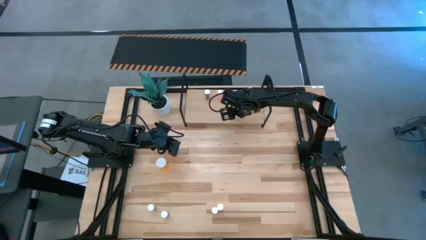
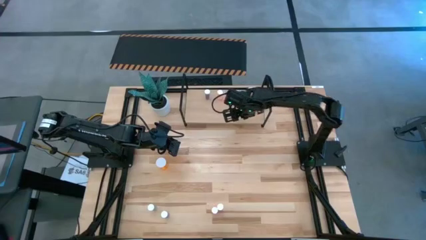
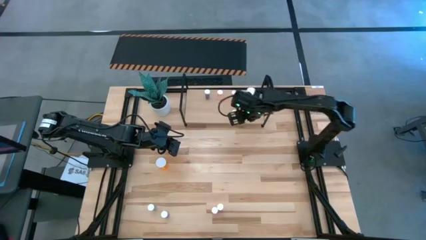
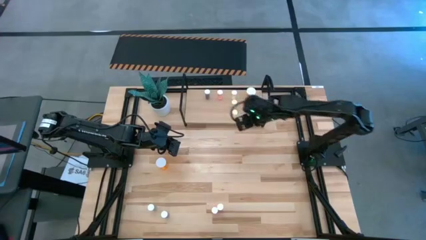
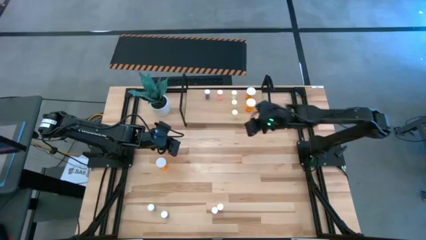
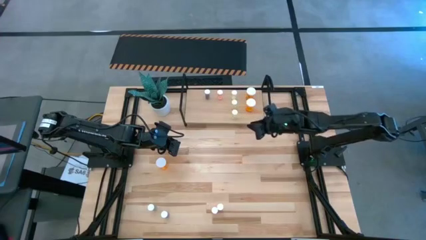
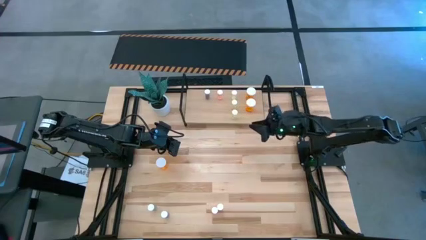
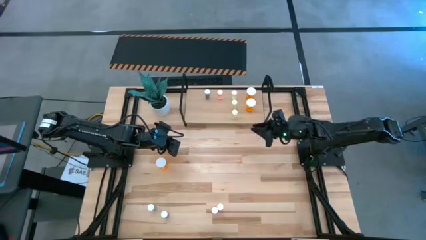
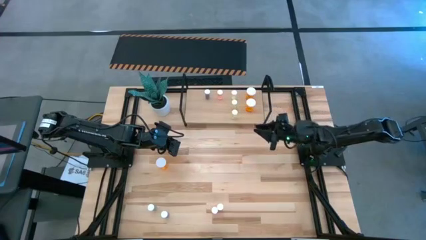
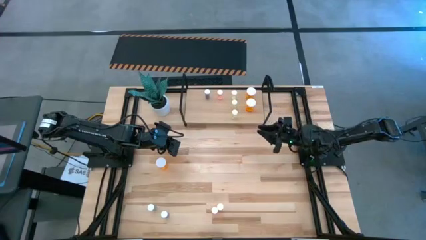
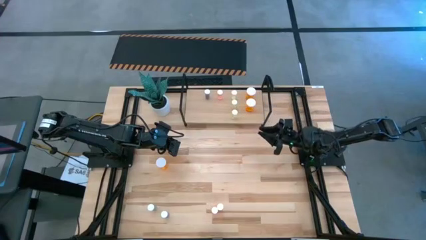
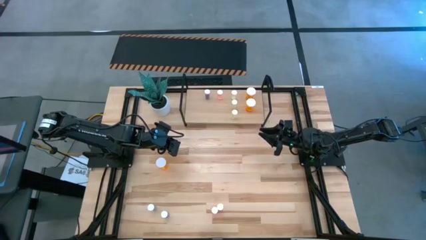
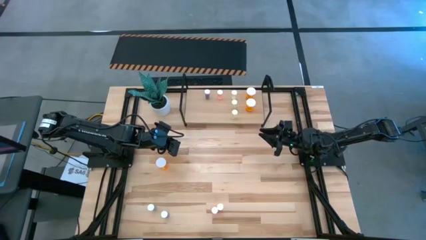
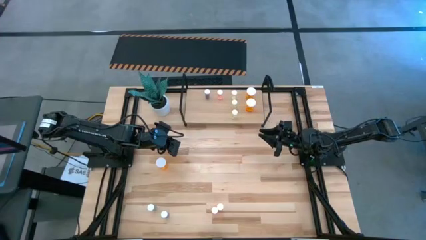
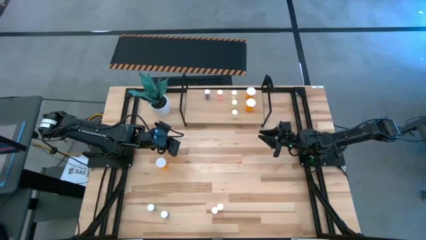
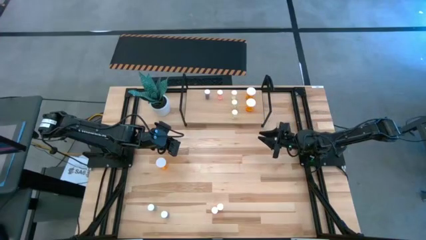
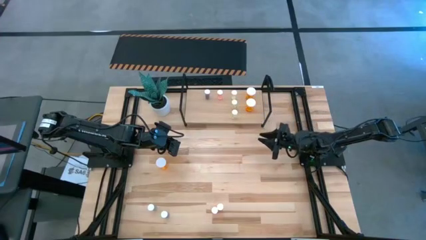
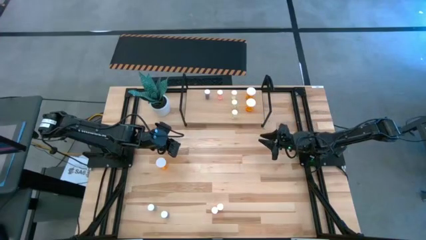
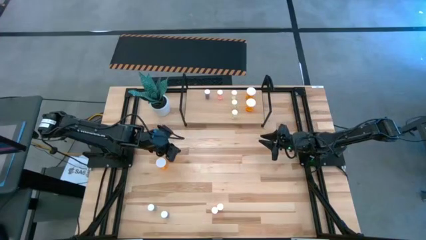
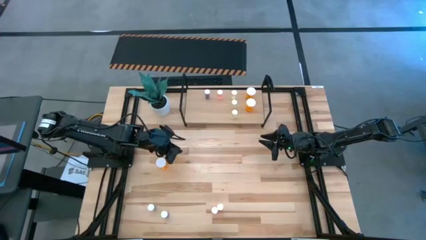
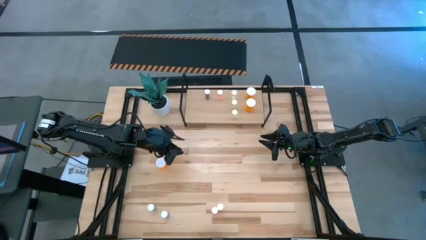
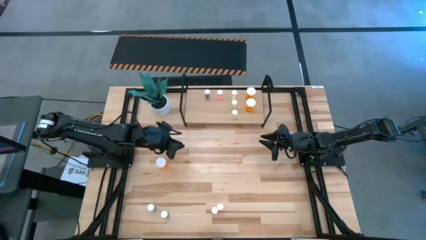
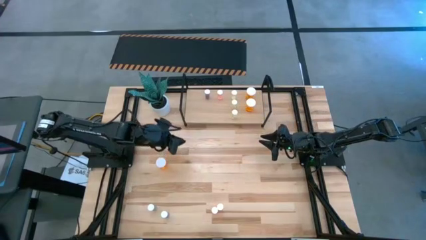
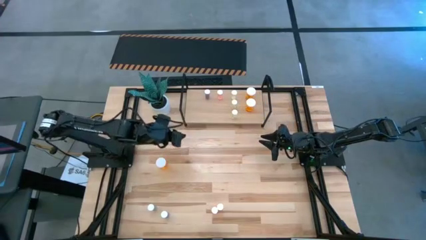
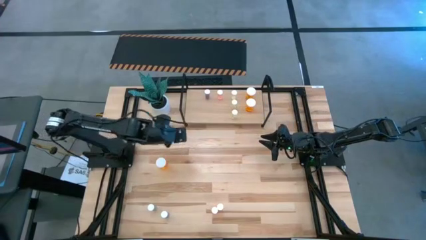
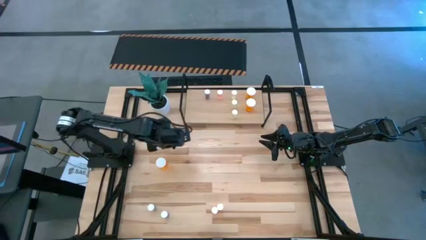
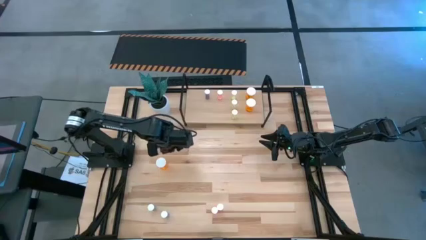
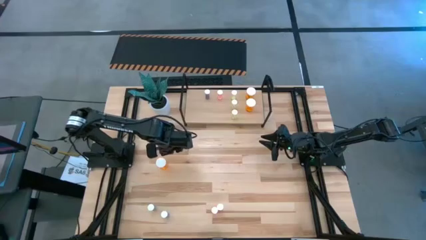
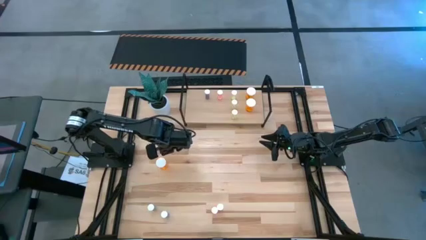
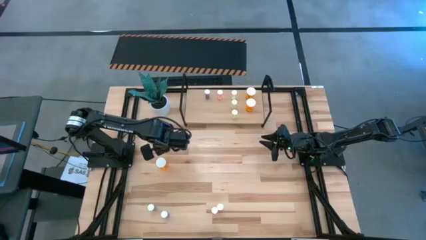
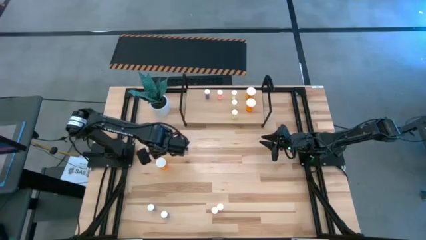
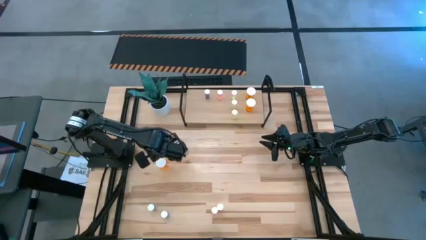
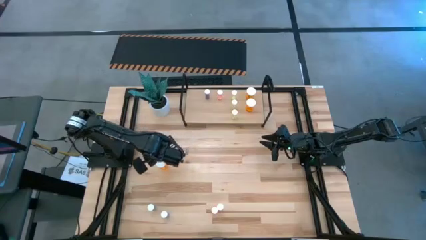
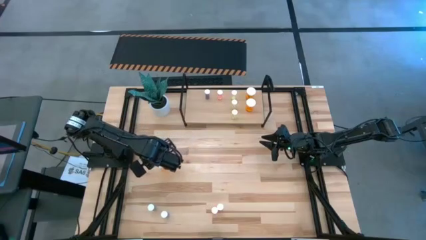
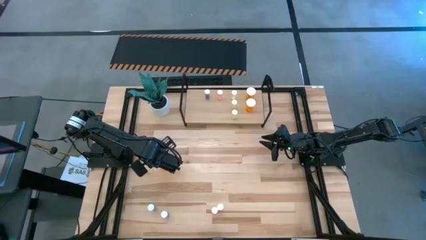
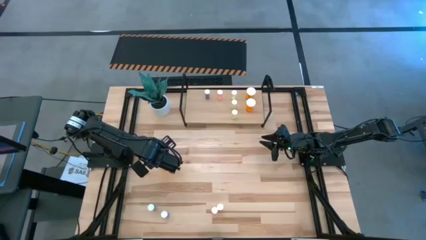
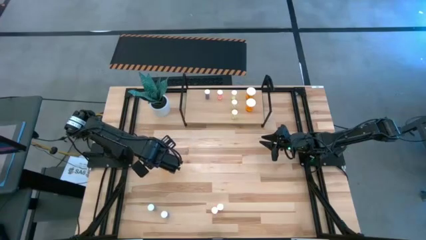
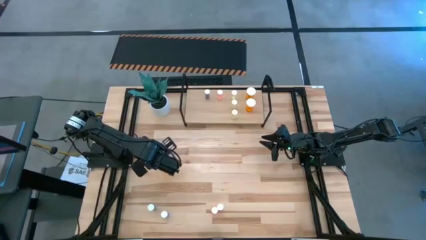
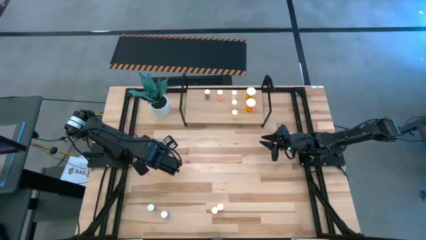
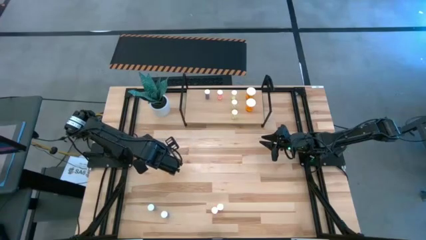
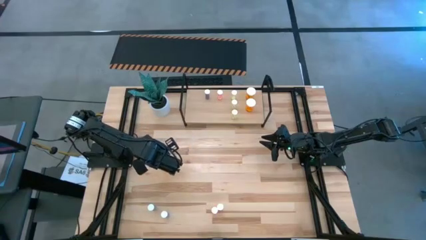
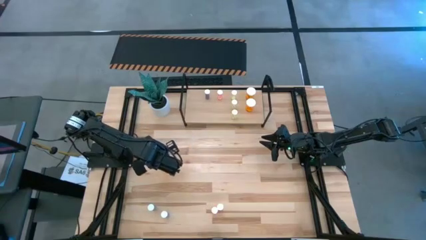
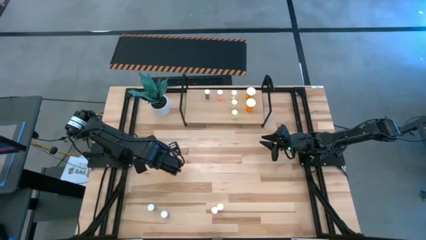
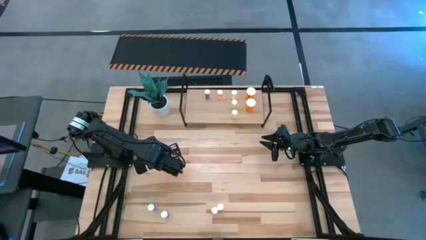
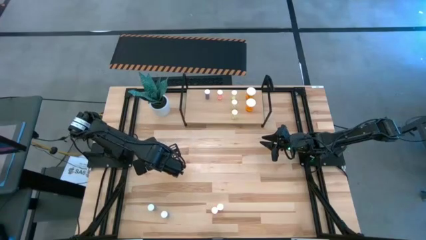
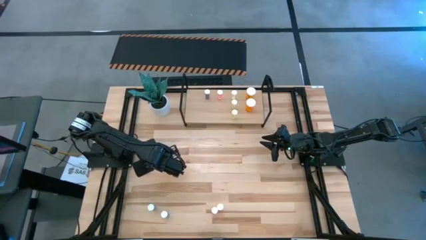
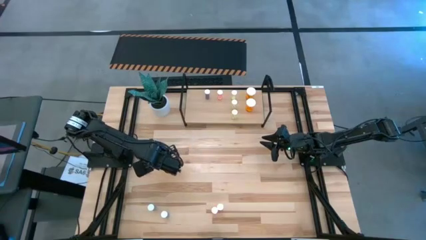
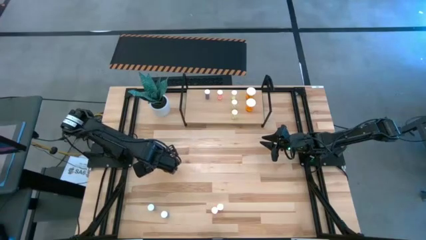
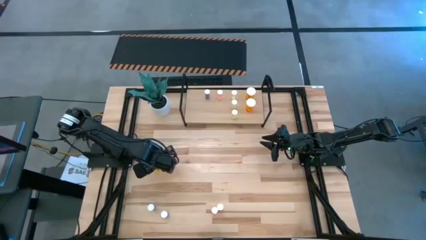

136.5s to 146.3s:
Task: Pick and place medicine bottles onto shelf by color
Move the orange pill bottle to the top of the table

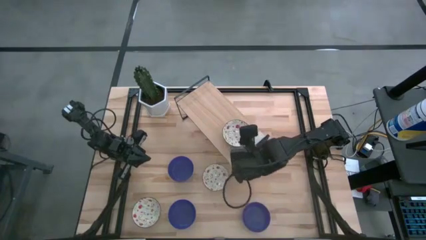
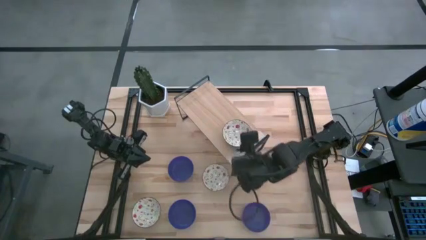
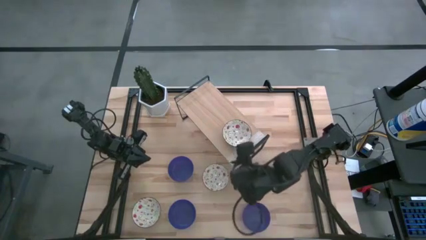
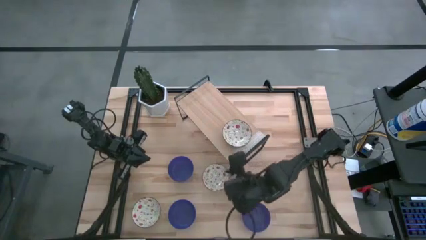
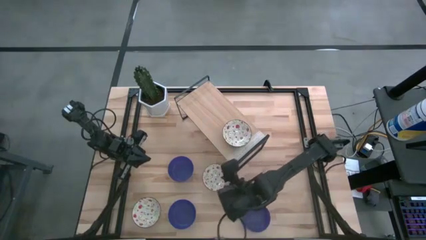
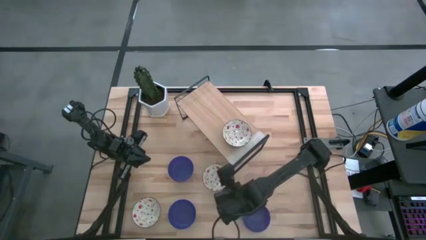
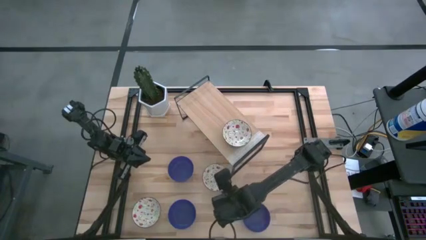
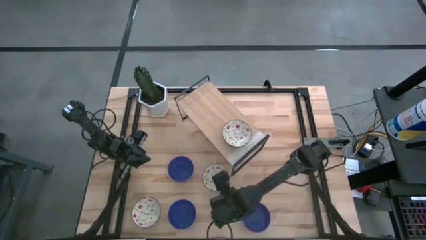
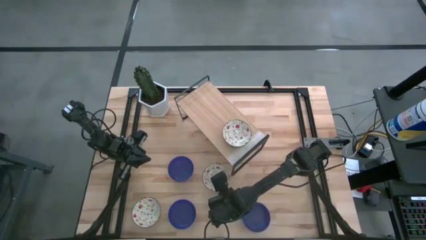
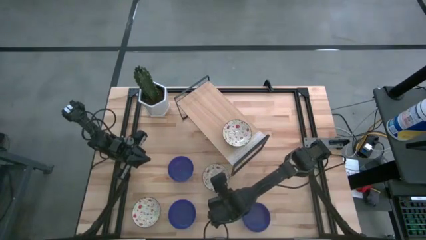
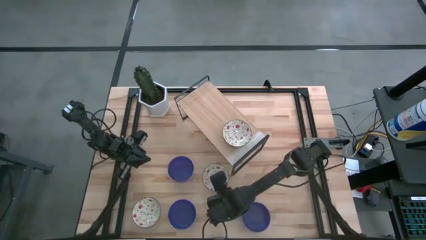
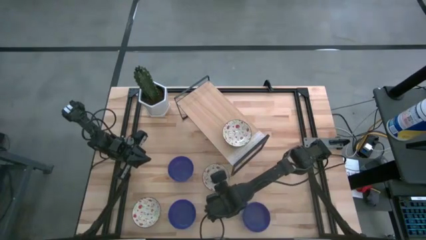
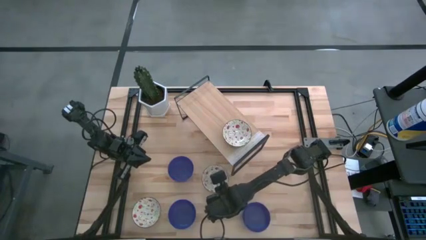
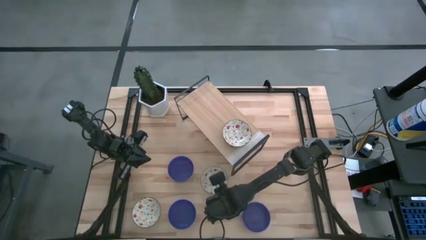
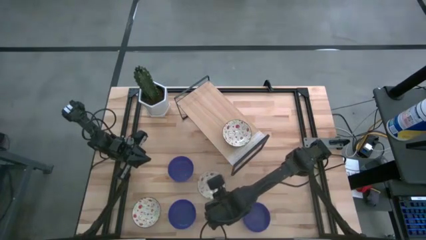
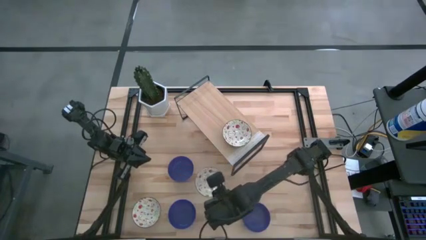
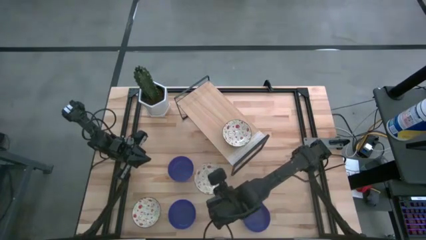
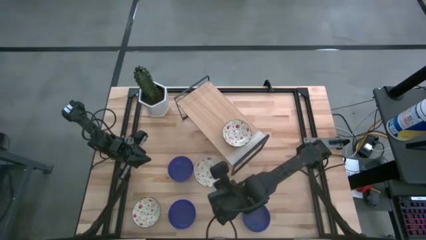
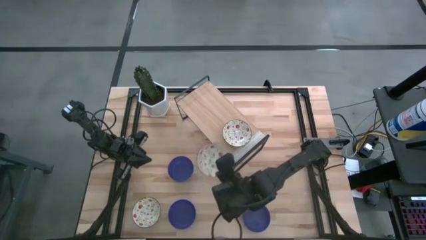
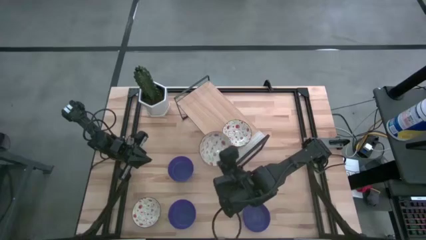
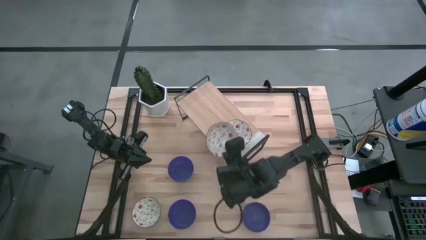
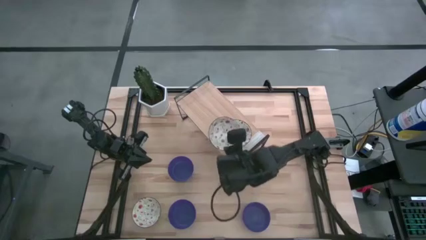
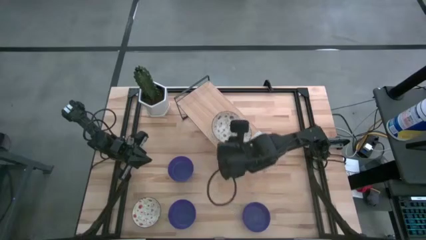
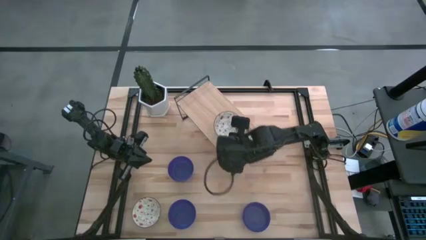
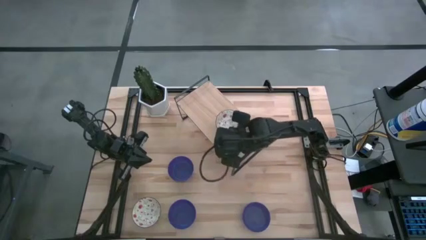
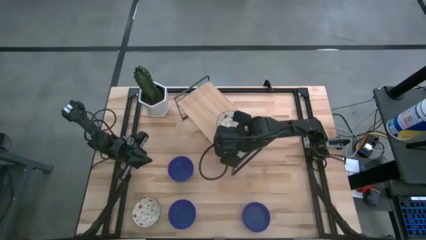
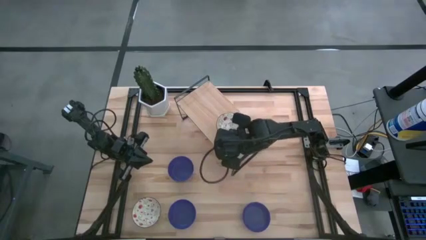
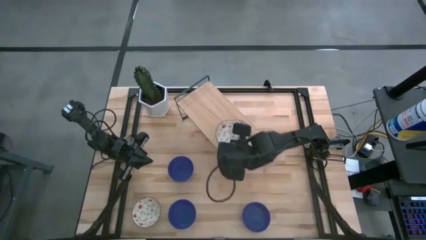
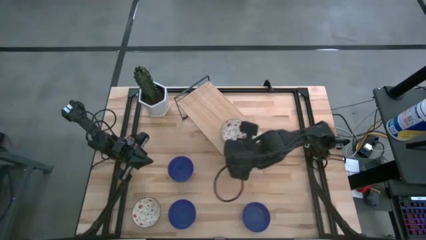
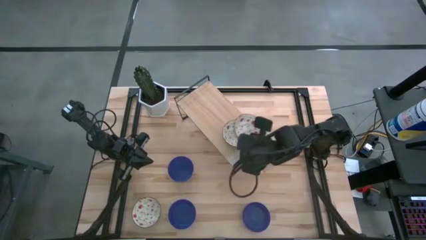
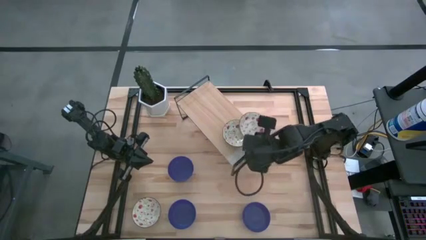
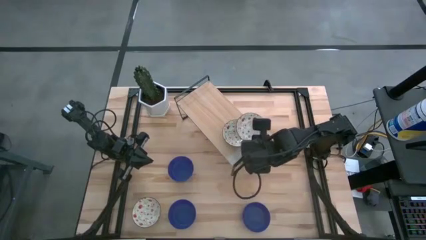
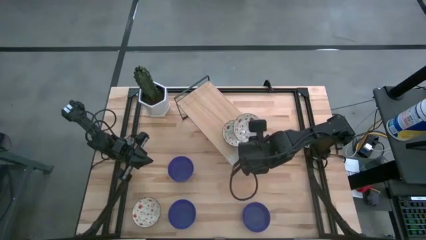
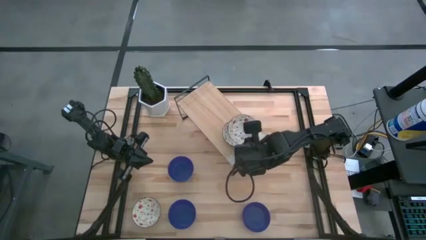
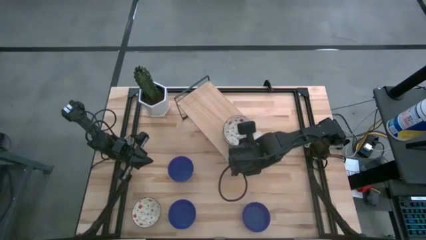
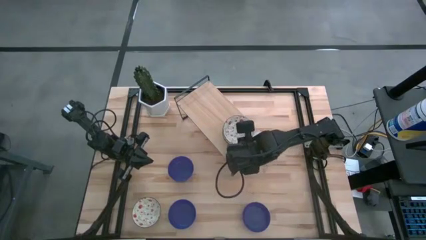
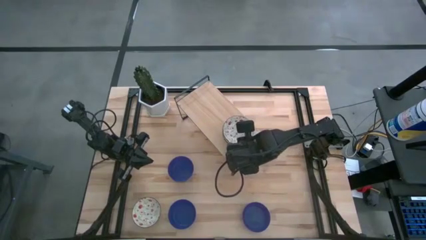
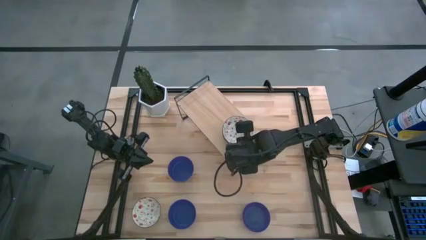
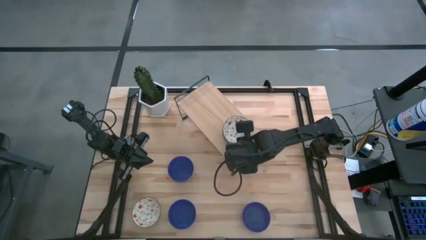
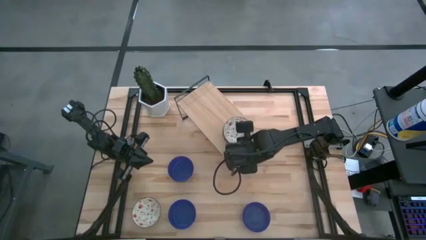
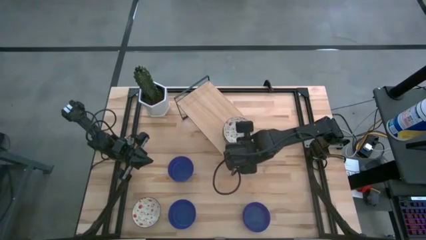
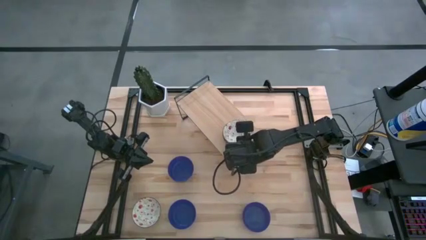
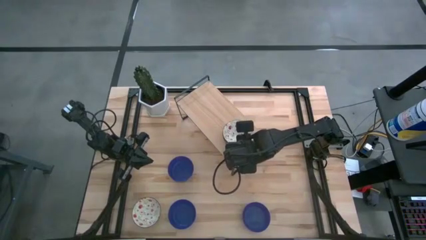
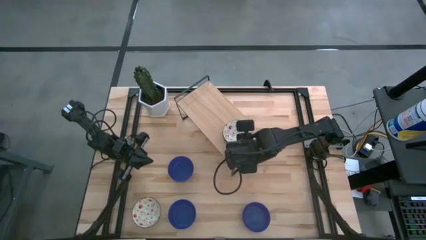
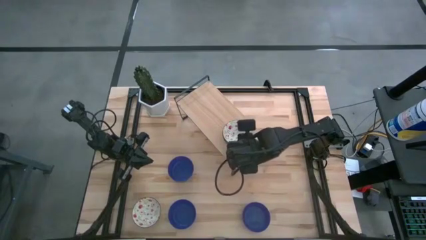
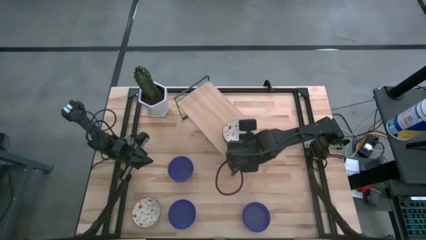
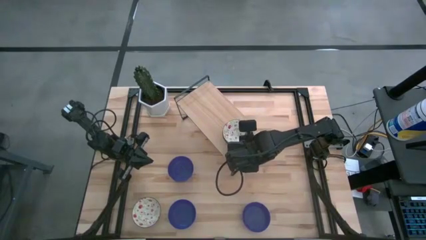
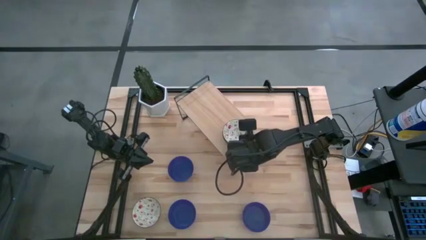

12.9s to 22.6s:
Task: Pick & Place Mini bowls
Stack the top white patterned bowl on the other white patterned bowl on the shelf
